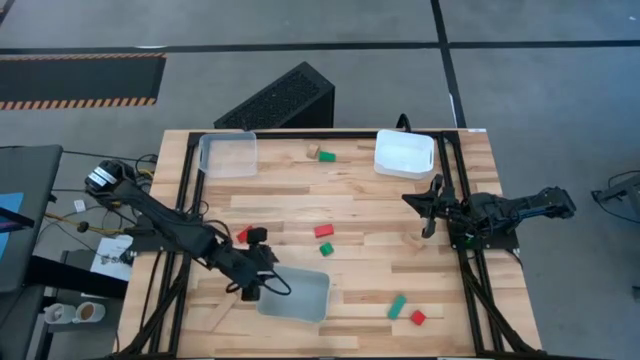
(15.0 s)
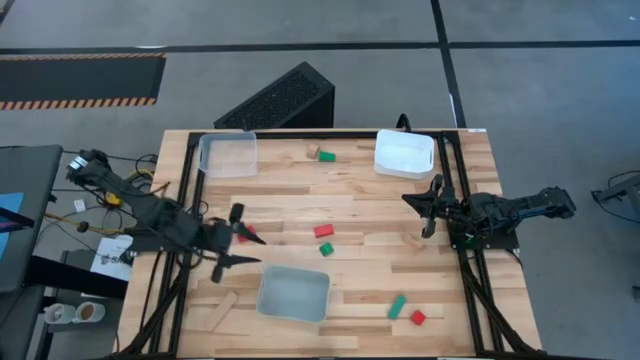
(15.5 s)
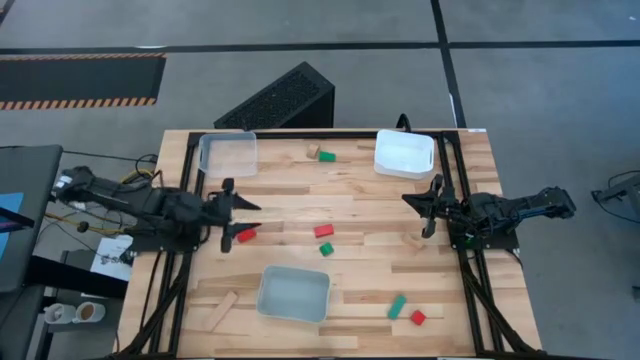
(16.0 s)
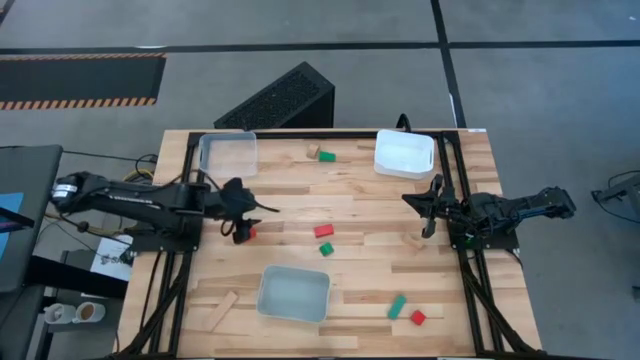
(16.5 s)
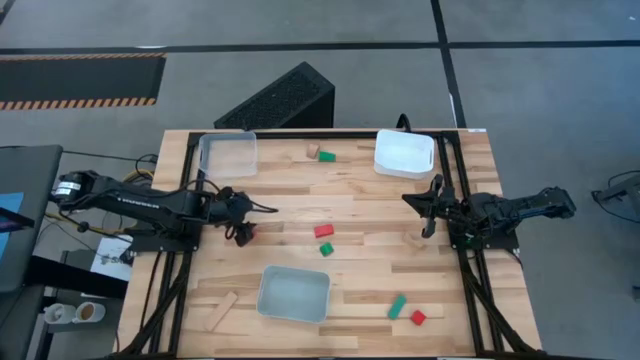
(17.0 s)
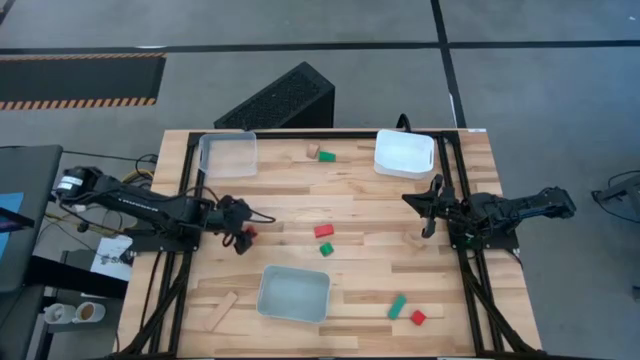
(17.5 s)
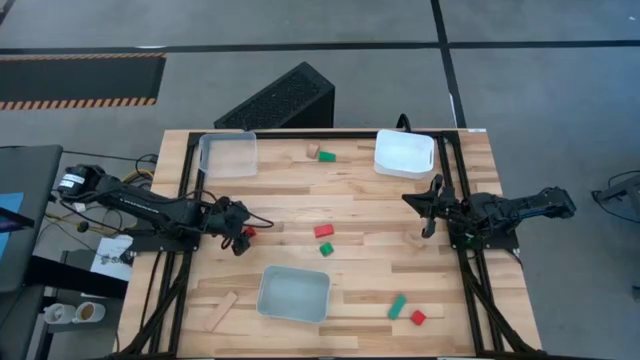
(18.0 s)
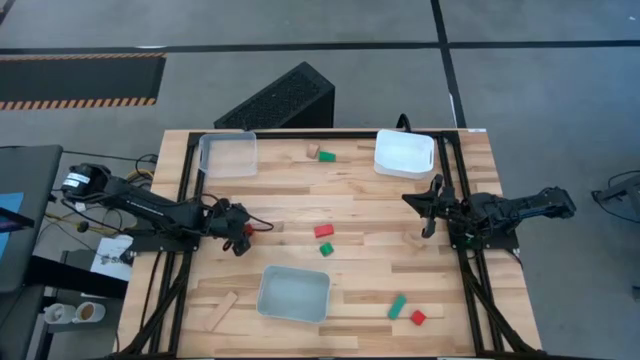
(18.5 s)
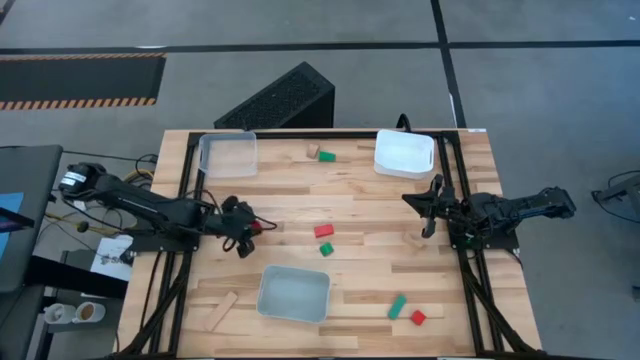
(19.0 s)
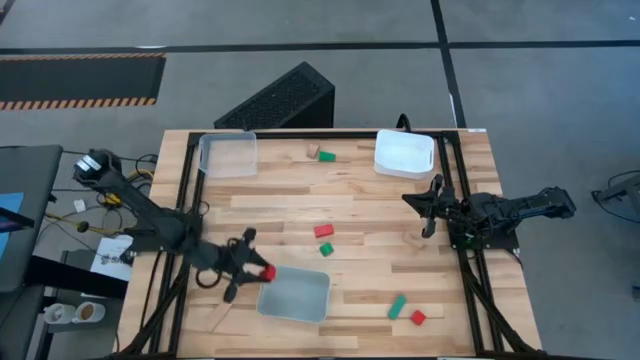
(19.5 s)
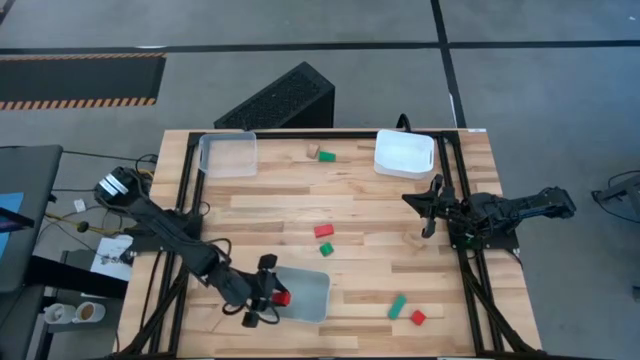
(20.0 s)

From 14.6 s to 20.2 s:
Task: Sort & place blocks by color
Put the top left red block into the gray bin

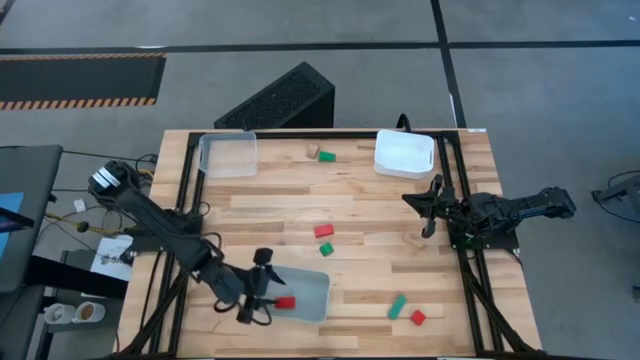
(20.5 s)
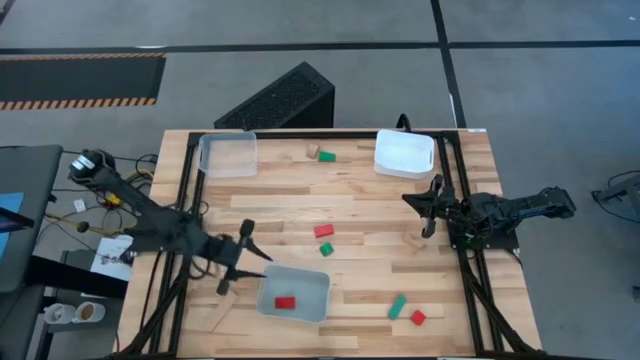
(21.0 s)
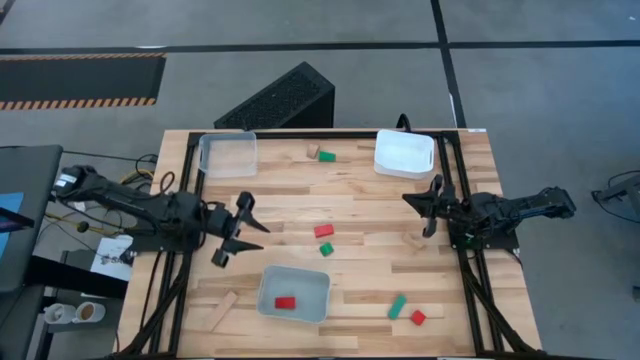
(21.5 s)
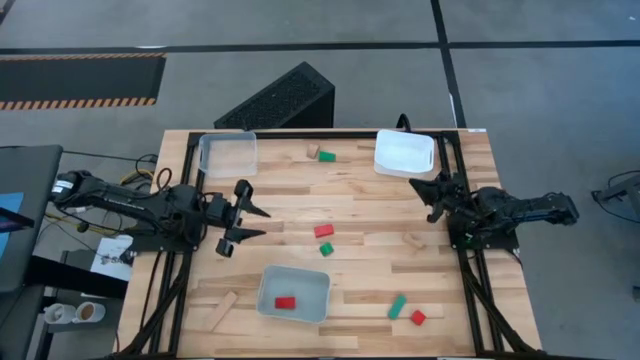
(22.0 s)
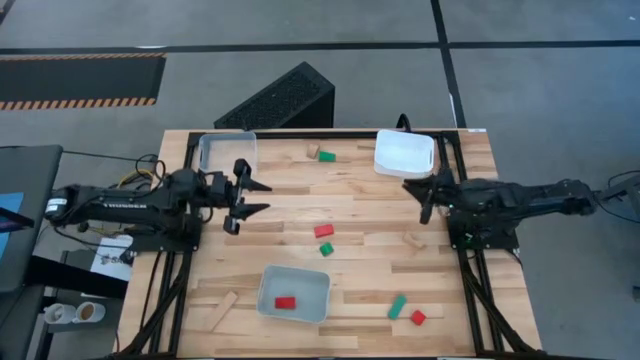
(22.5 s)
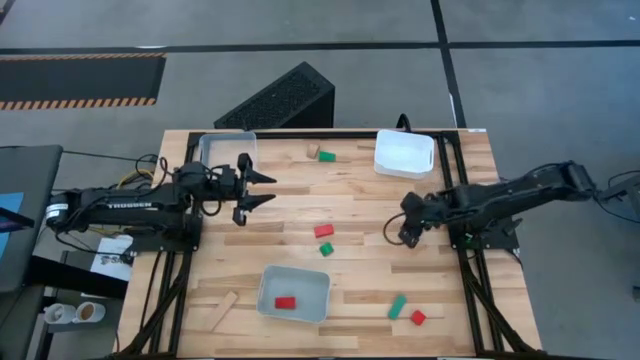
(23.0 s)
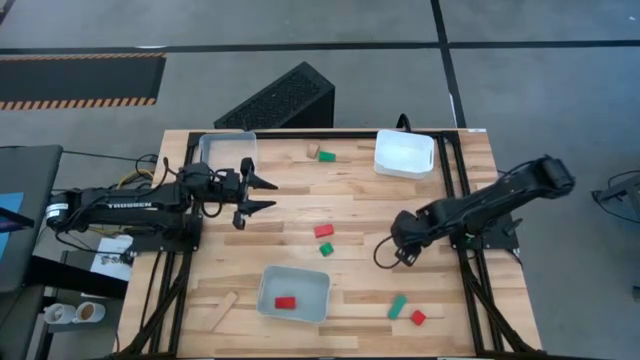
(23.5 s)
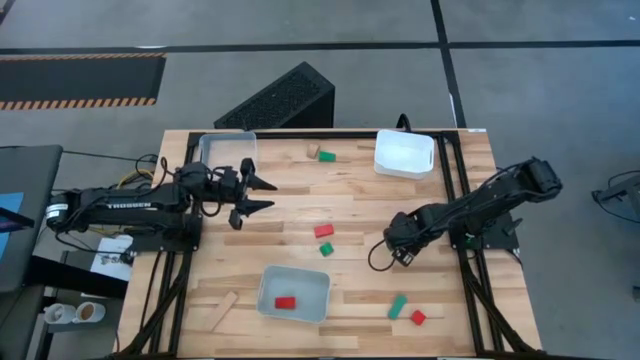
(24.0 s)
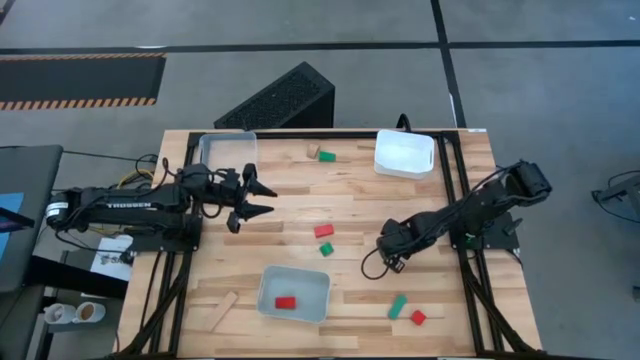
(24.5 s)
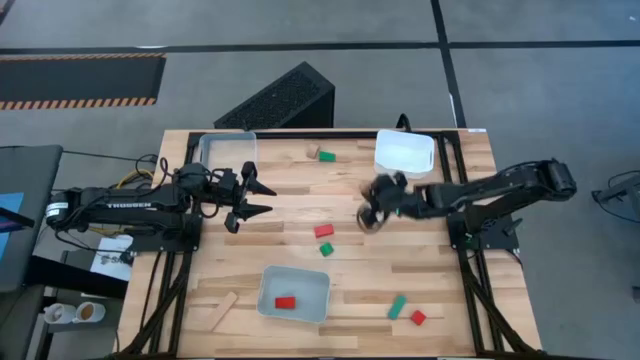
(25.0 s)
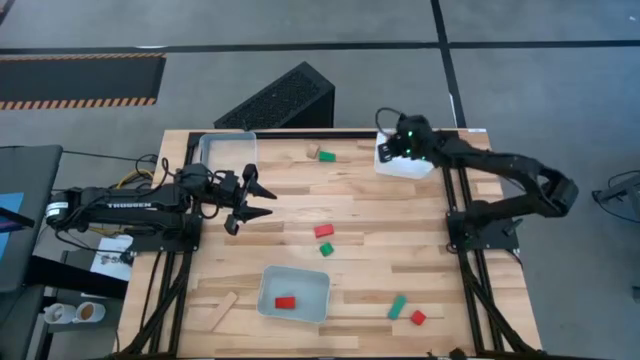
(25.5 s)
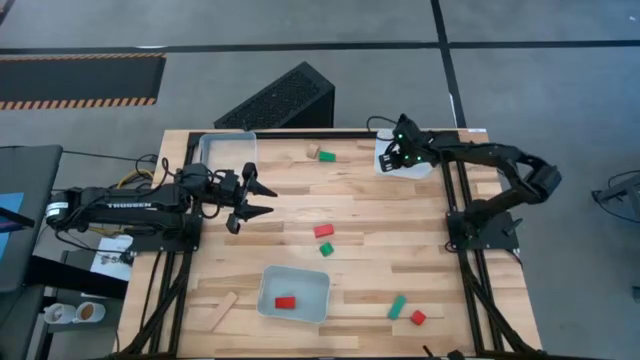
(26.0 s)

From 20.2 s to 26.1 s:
Put the middle brown block into the white bin

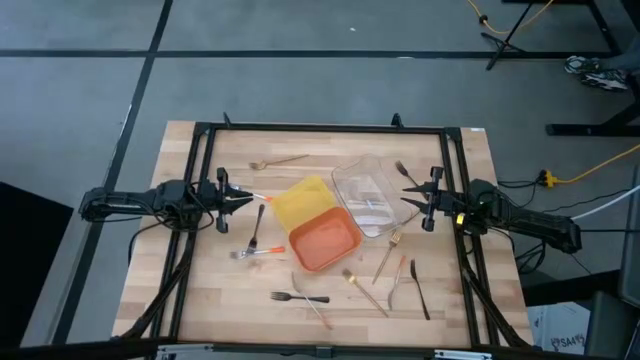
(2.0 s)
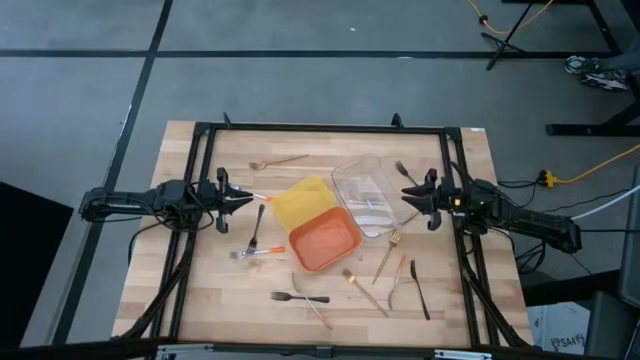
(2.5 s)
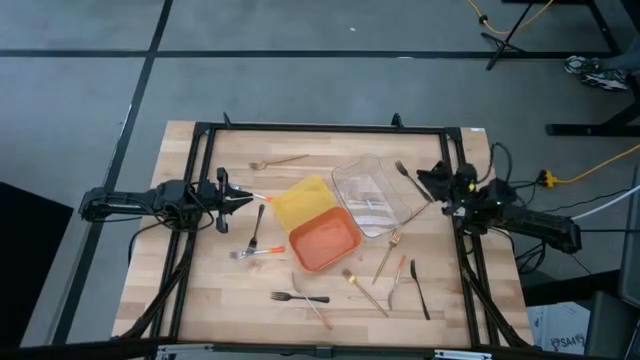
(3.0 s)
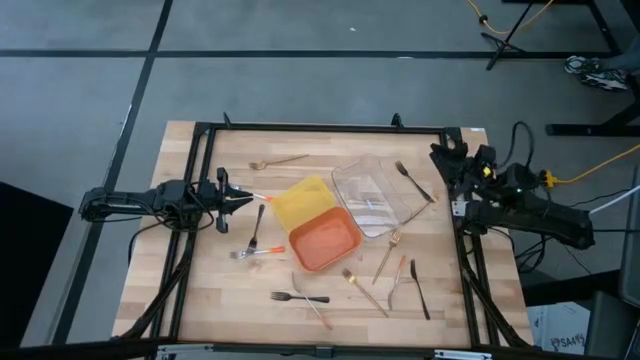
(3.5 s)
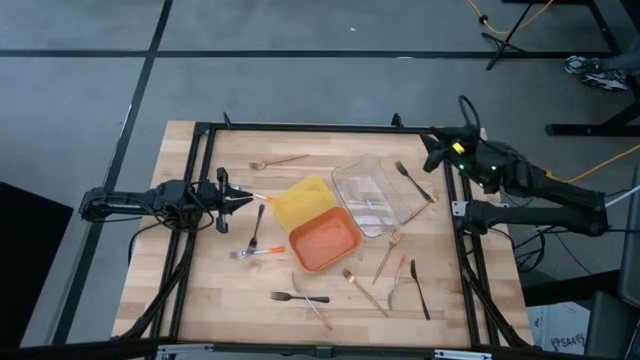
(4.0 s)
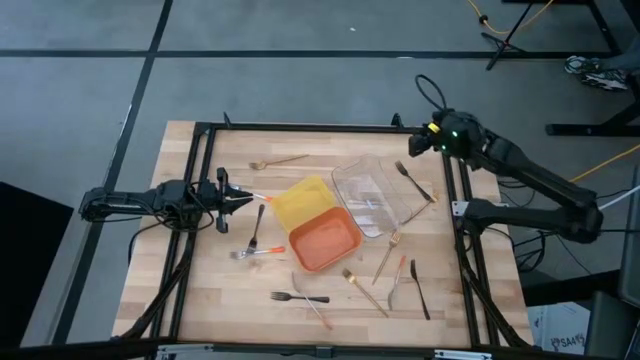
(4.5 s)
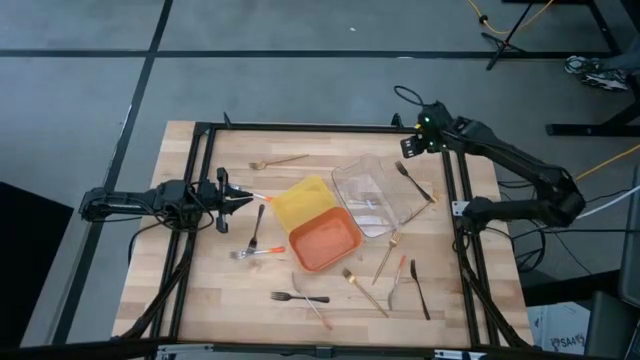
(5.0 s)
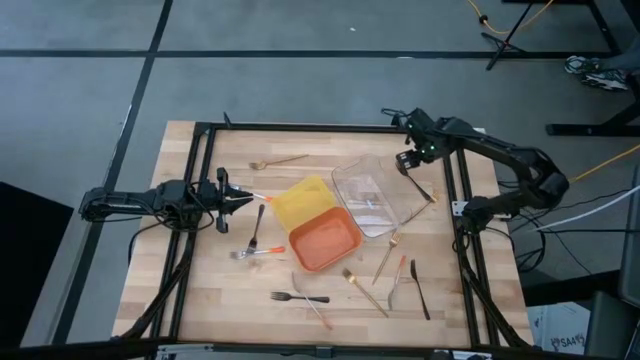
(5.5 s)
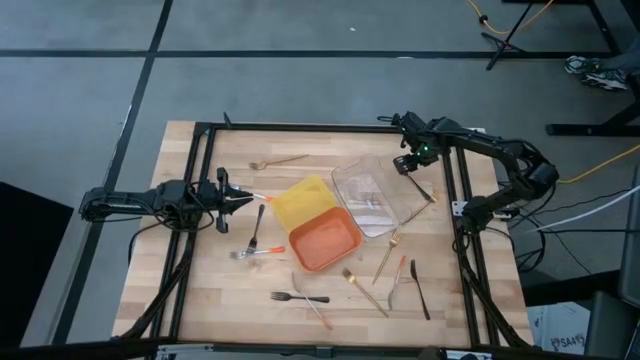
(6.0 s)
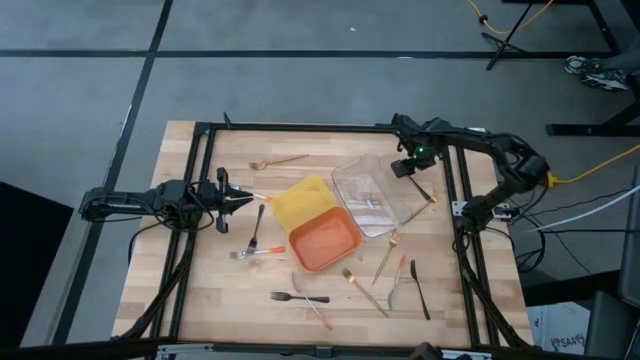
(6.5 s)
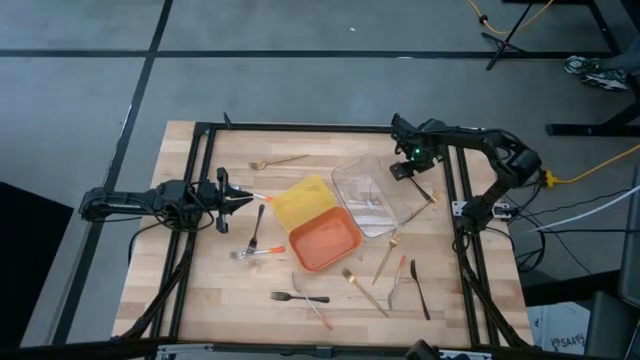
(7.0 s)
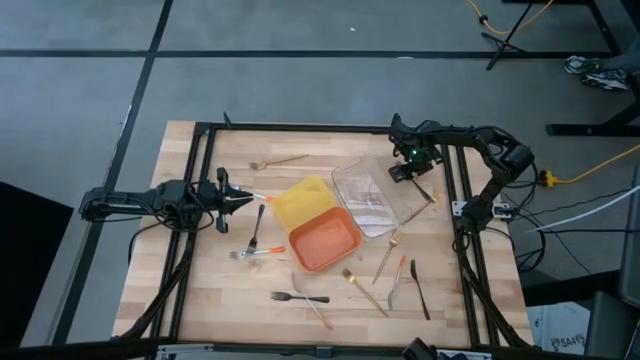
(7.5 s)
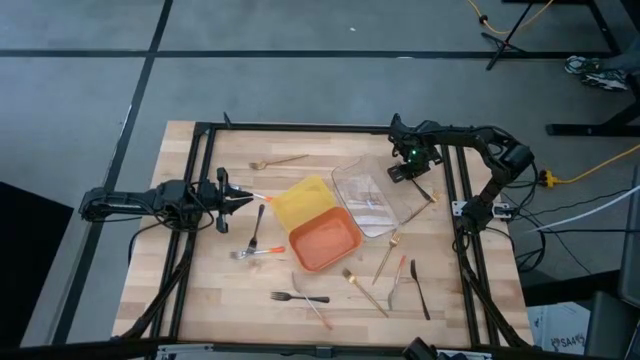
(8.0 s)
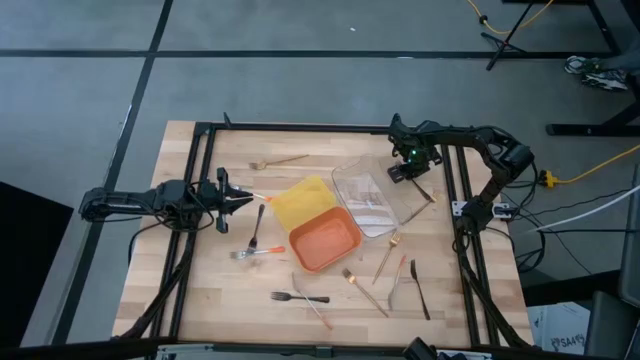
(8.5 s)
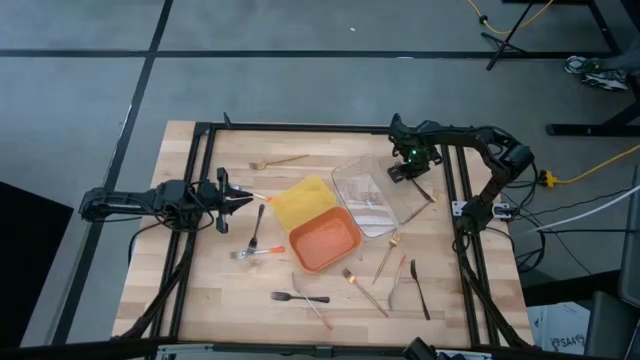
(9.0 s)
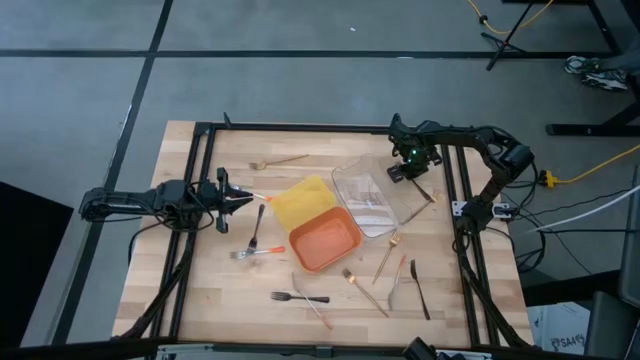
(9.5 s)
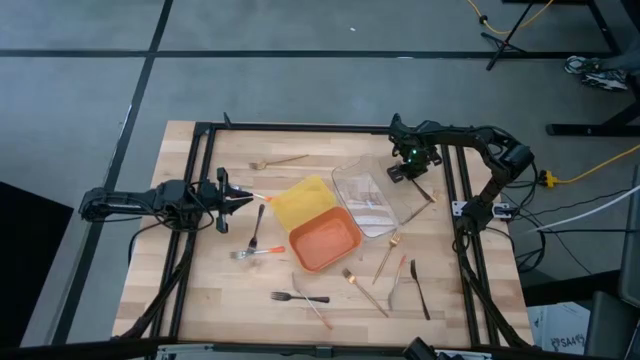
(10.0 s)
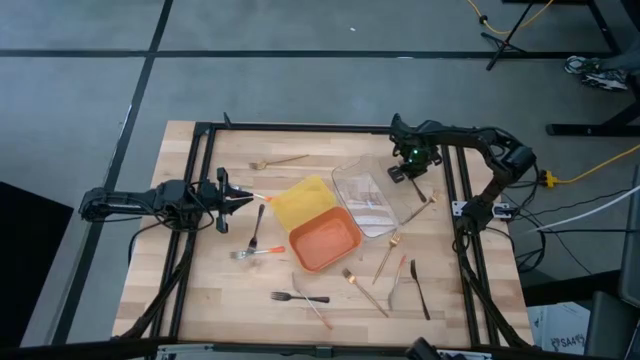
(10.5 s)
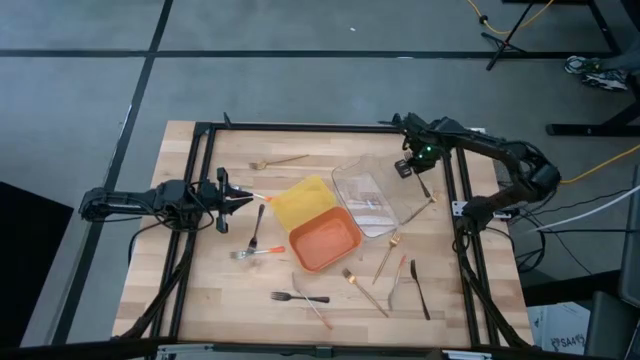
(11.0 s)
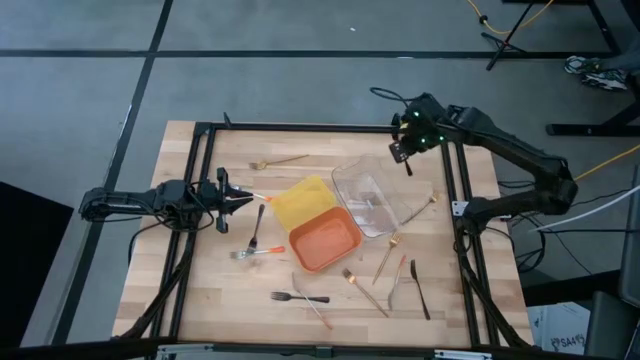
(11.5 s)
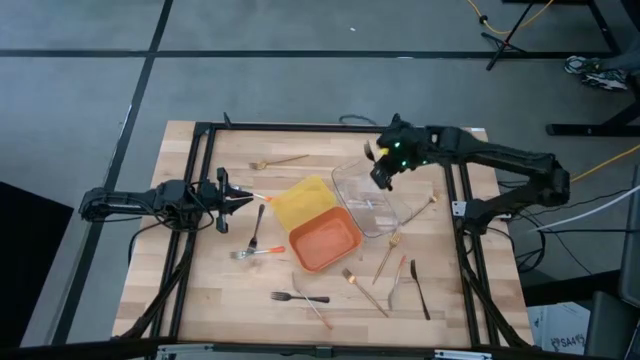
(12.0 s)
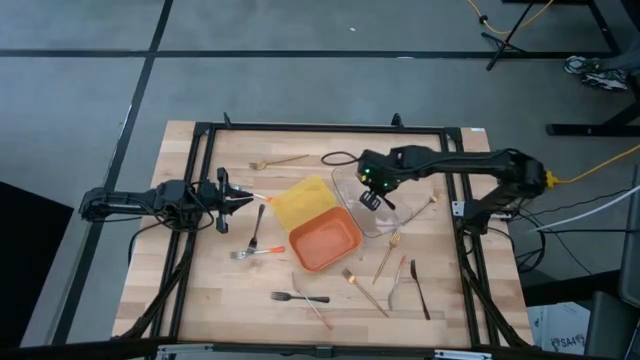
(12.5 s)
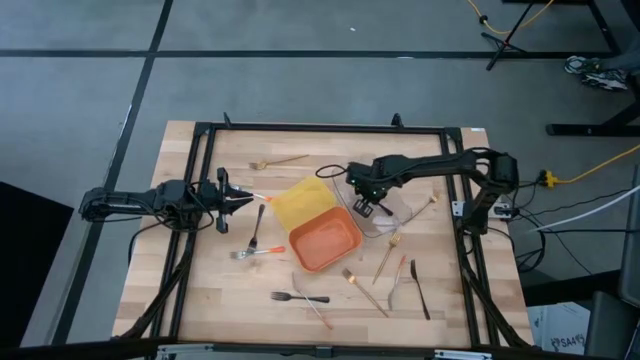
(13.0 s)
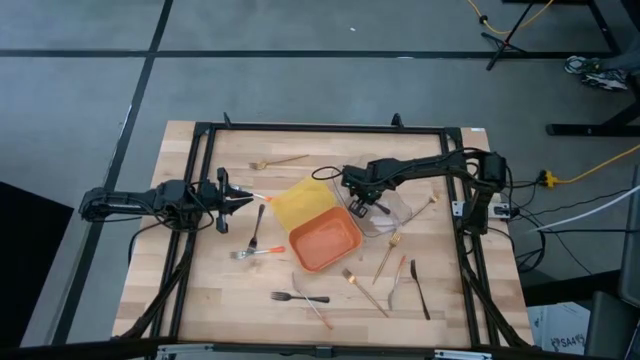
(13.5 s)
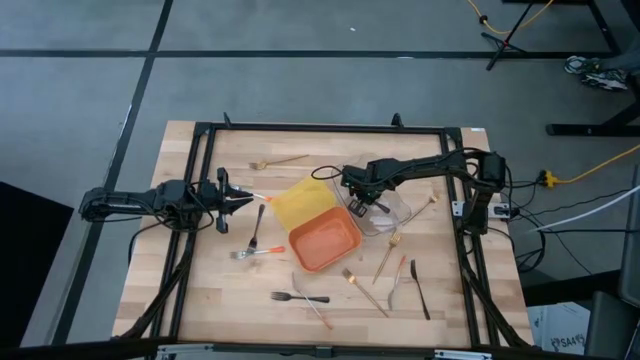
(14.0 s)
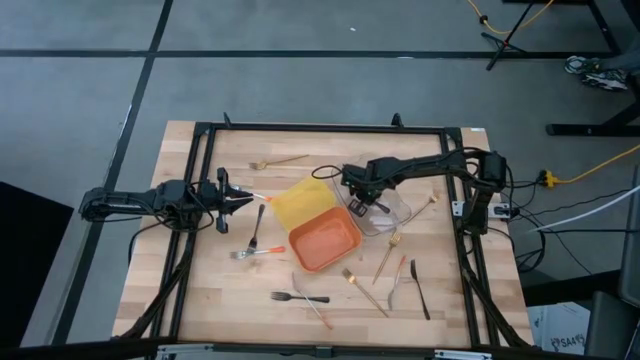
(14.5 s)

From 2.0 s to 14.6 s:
Task: Sort silverware by color (type)
Put the black fork into the transparent bin
